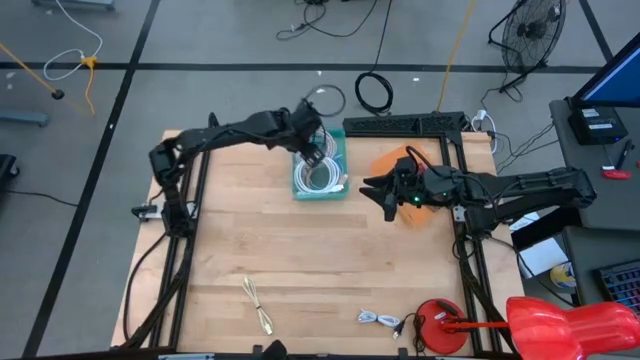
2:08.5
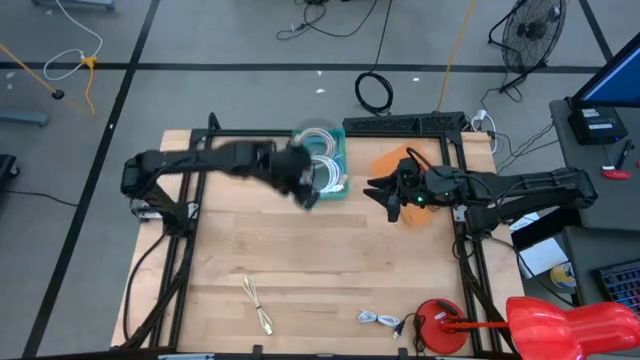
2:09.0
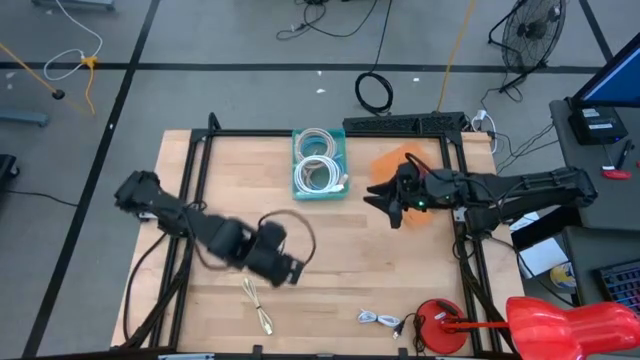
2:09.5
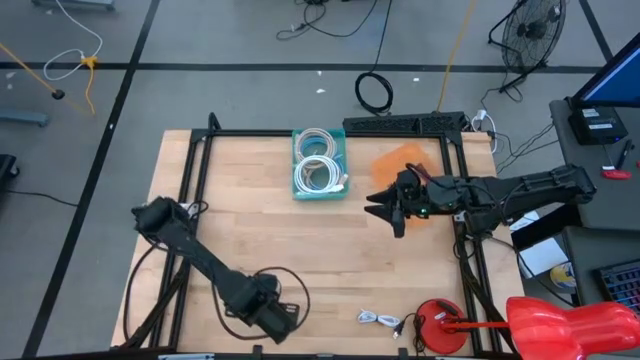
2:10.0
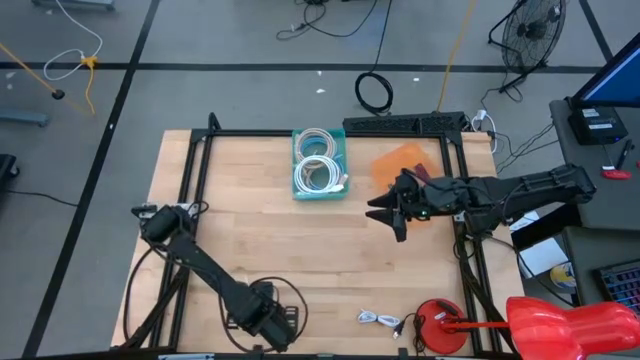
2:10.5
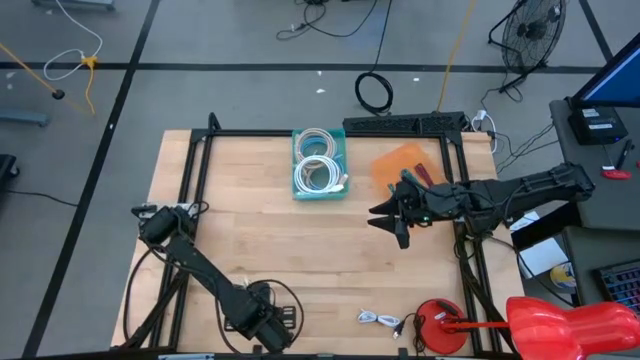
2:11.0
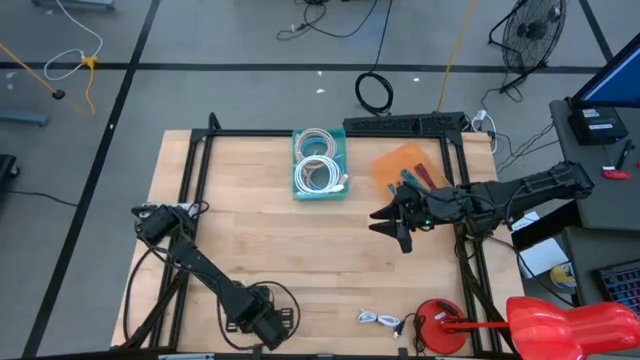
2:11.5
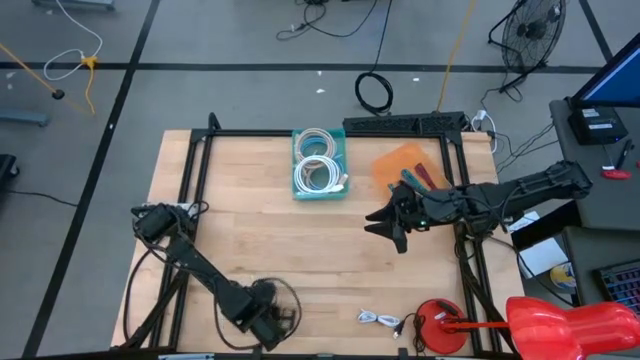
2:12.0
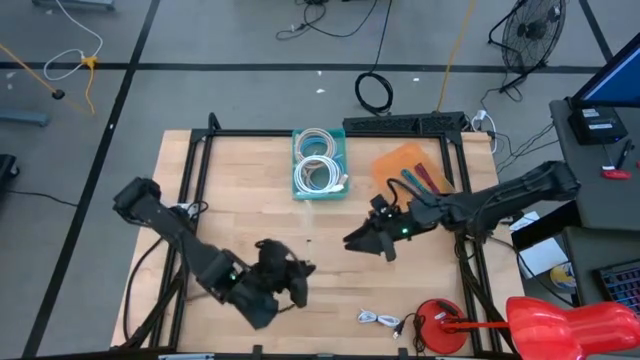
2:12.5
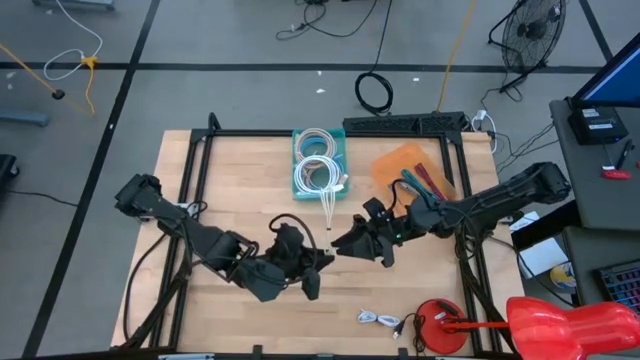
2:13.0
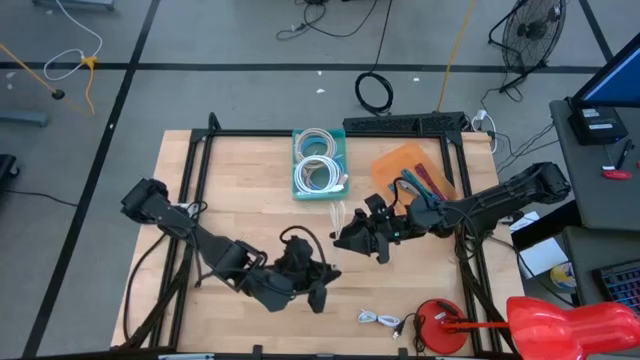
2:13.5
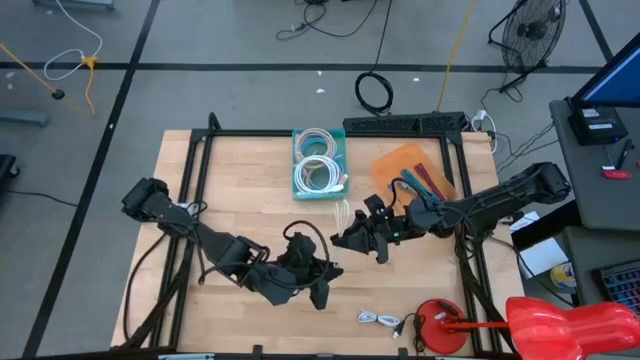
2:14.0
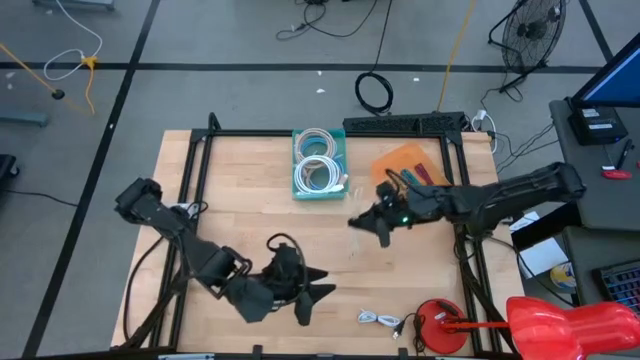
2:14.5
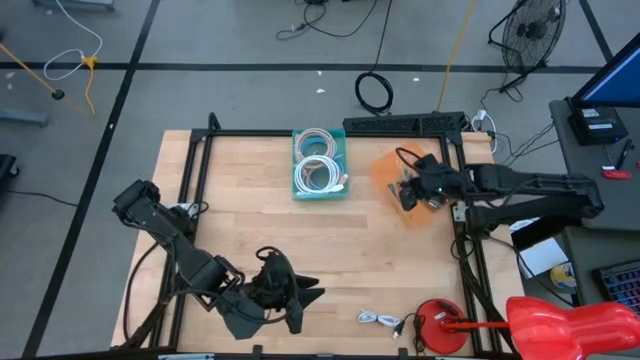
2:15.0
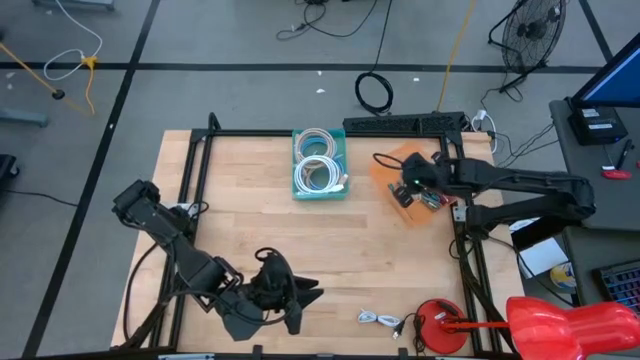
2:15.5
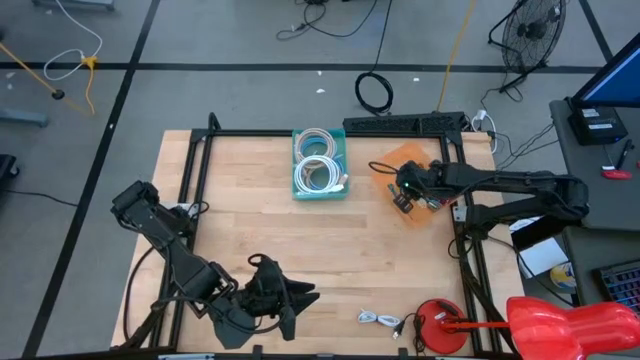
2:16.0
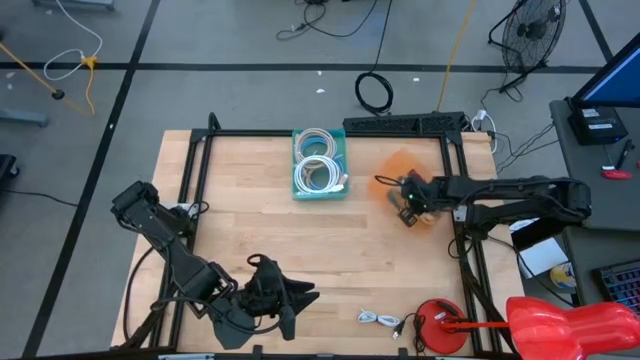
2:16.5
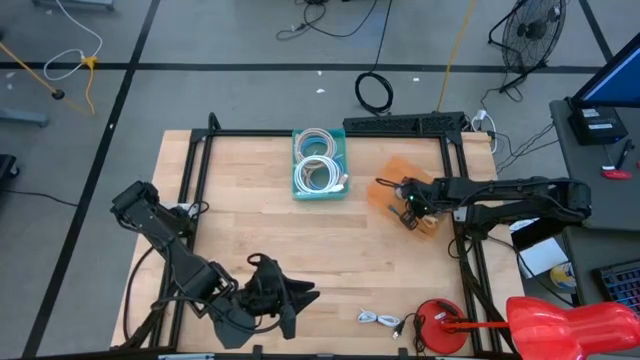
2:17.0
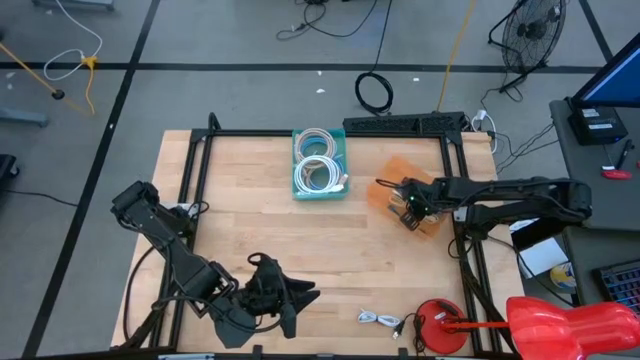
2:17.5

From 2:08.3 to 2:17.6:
Task: Pick & Place USB Port
Put the brown charger cable into the orange bin

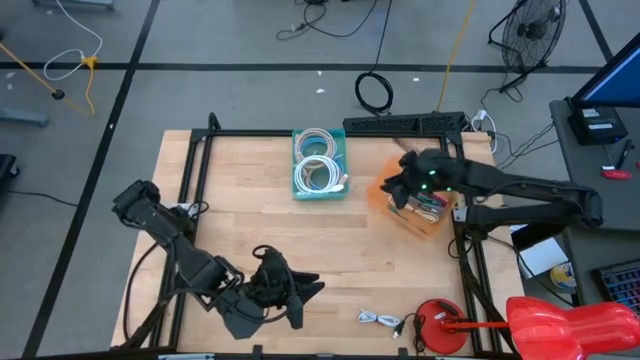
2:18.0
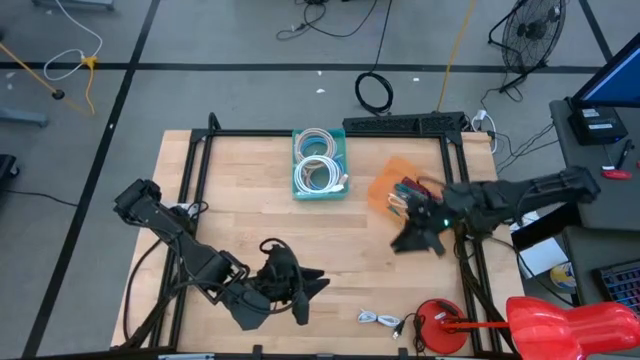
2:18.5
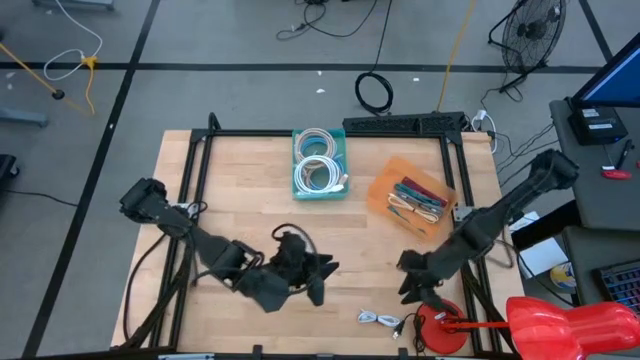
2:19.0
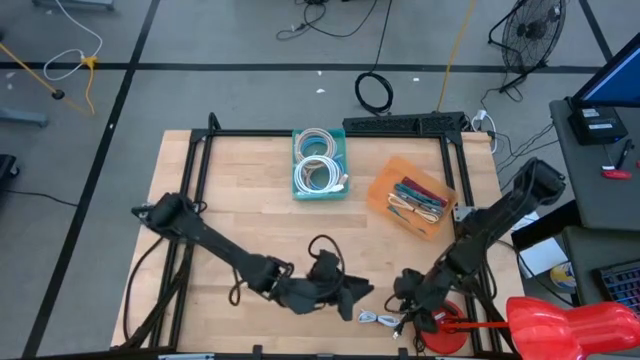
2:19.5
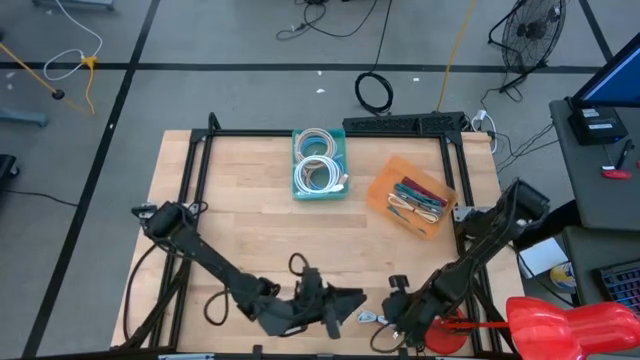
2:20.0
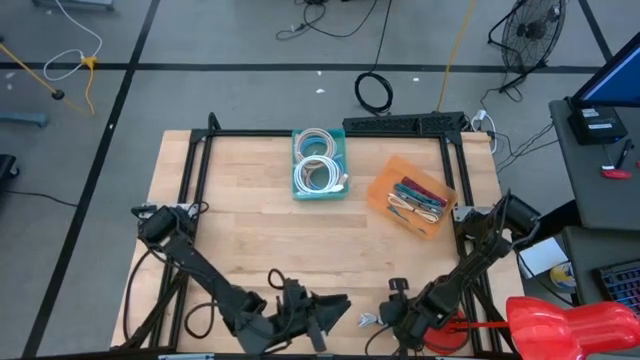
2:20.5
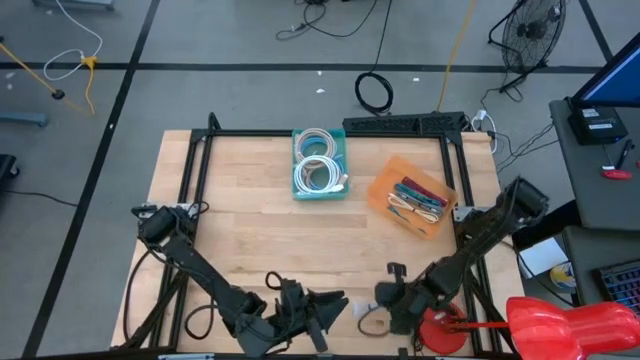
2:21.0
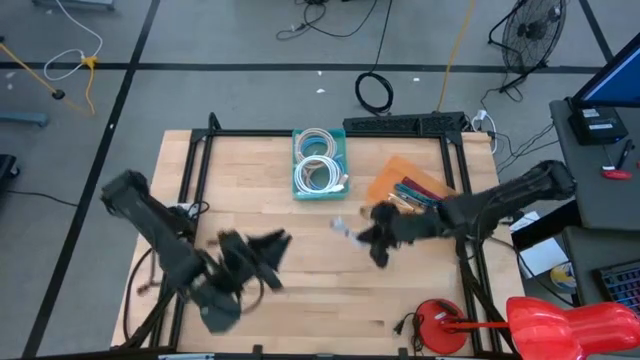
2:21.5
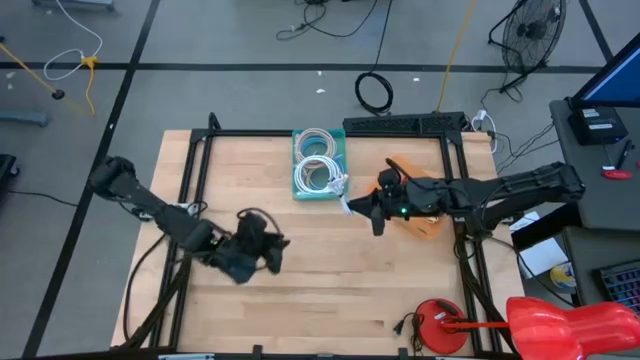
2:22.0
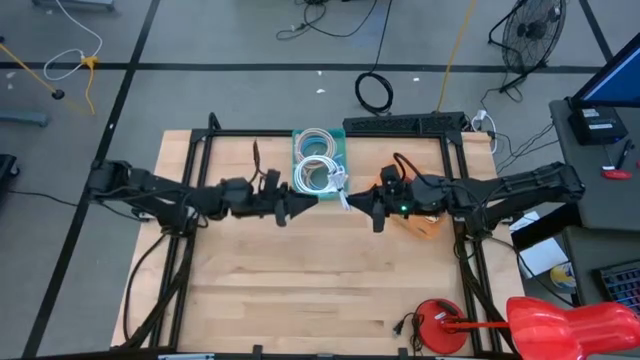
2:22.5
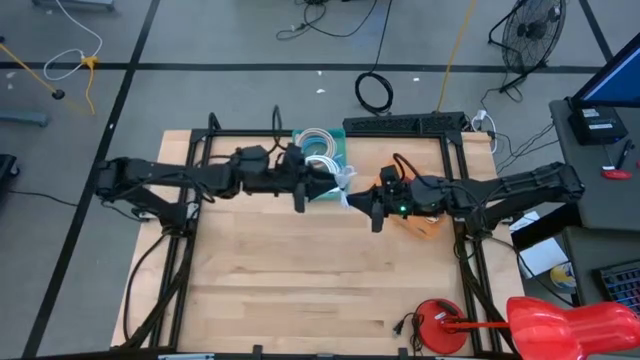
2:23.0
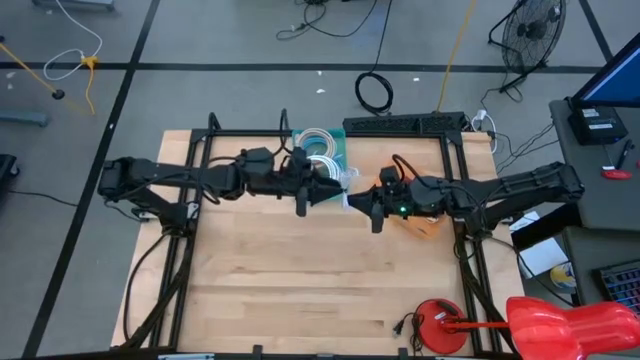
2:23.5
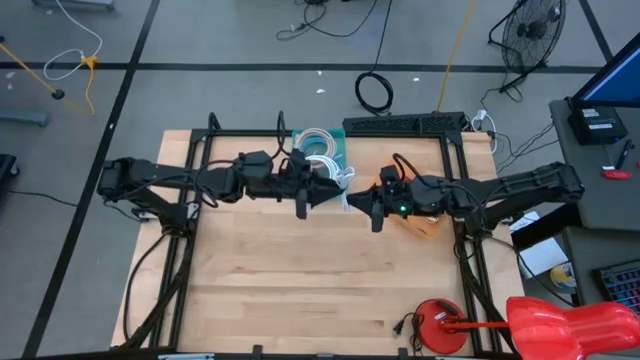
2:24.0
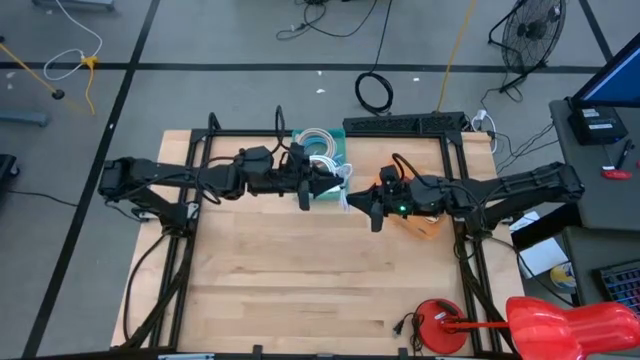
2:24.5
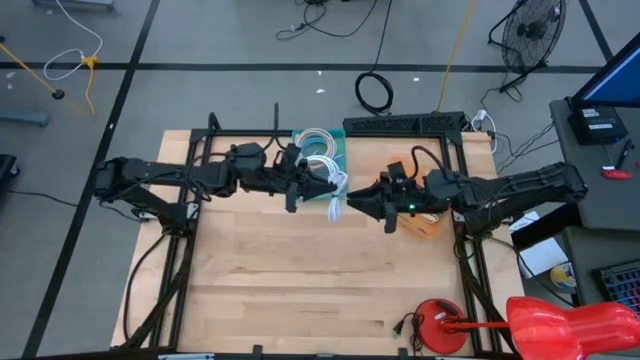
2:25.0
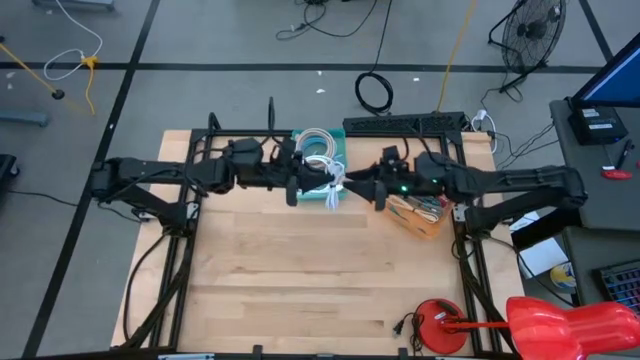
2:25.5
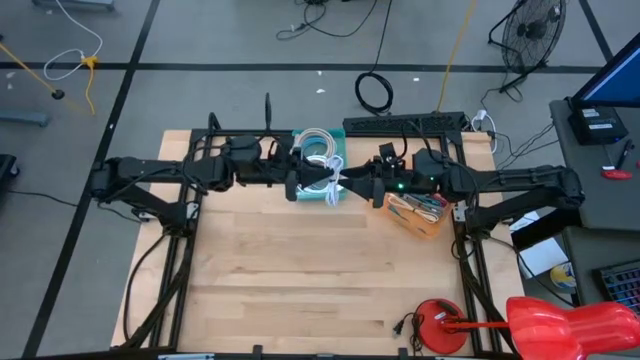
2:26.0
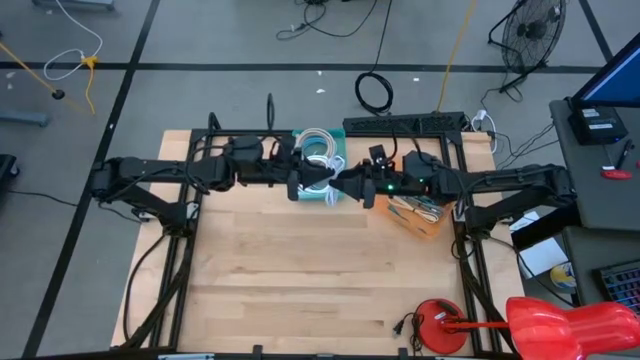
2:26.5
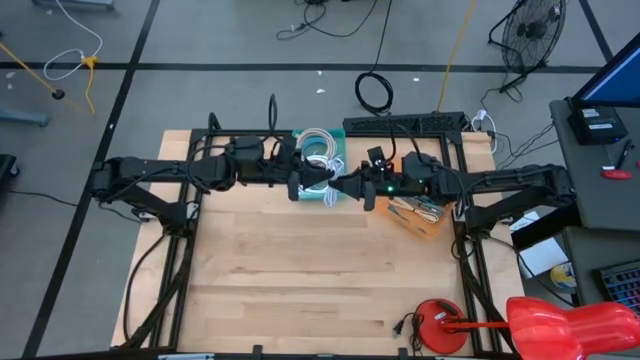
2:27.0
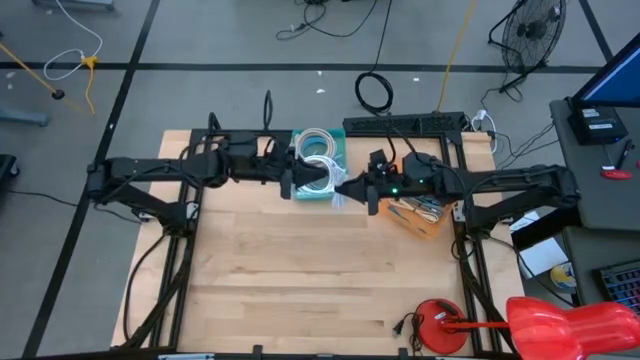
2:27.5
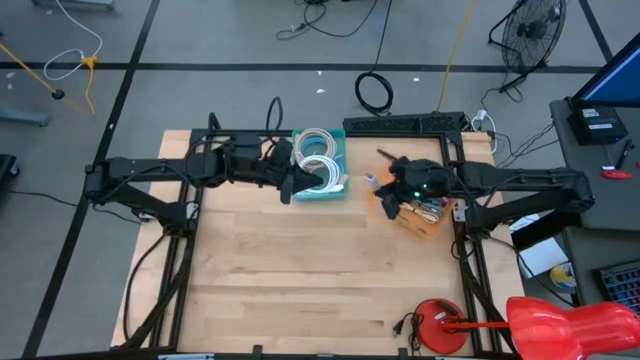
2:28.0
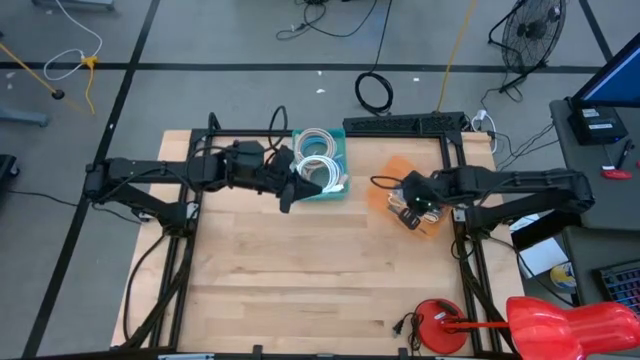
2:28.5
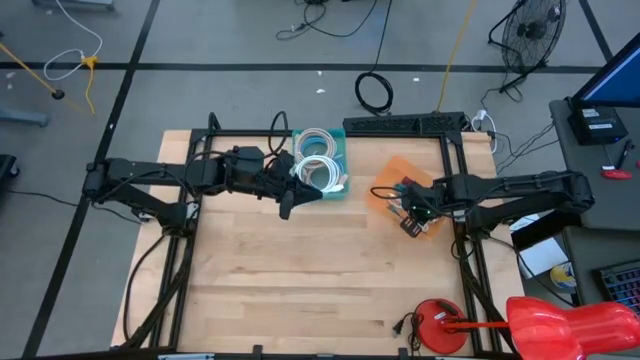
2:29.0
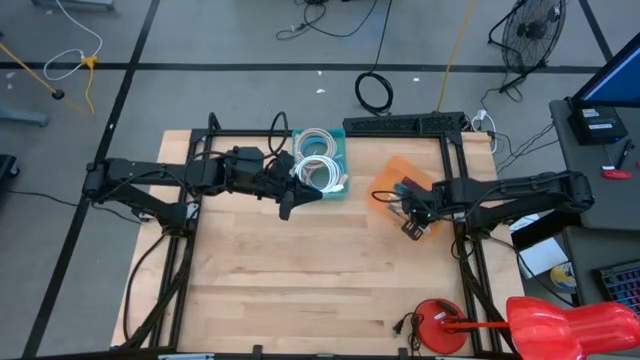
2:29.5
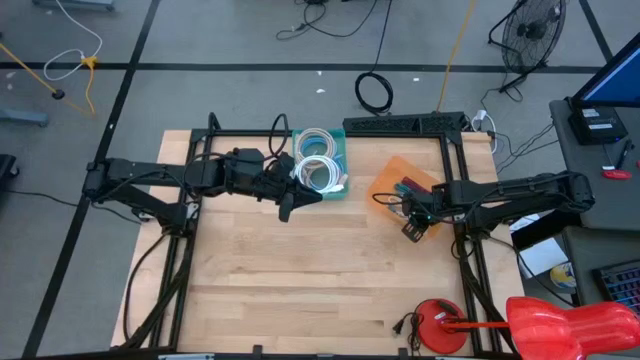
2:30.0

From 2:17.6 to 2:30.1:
Put the white charger cable into the orange bin
